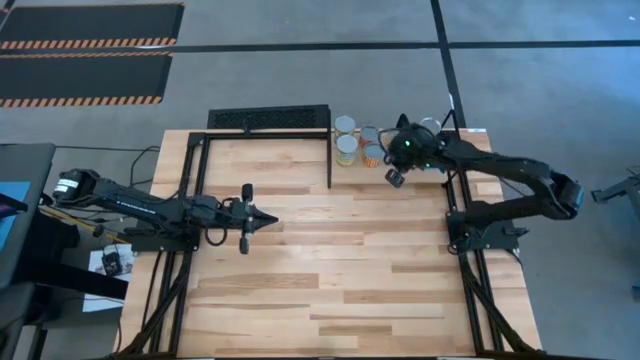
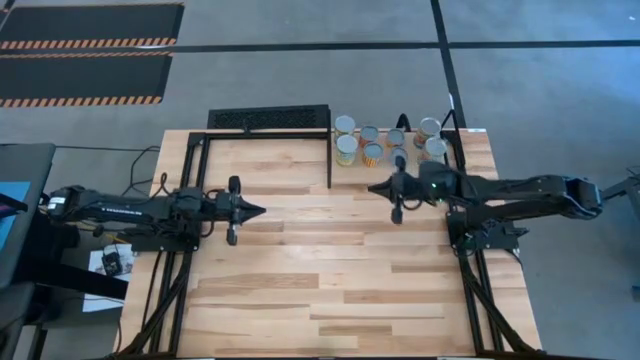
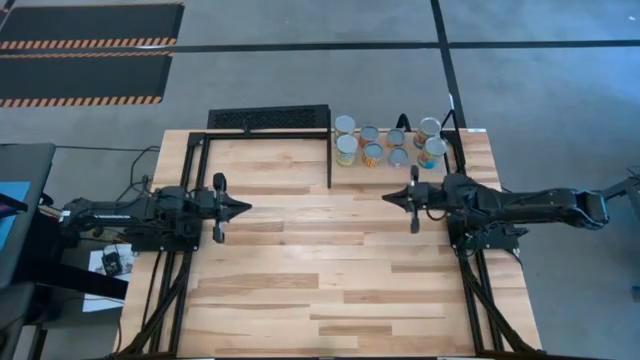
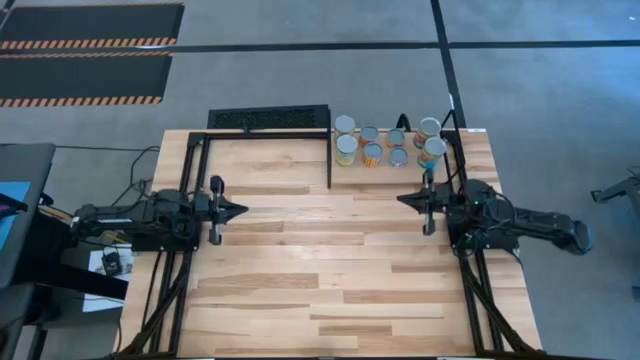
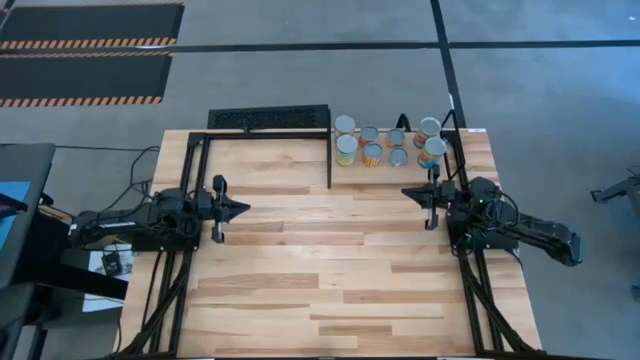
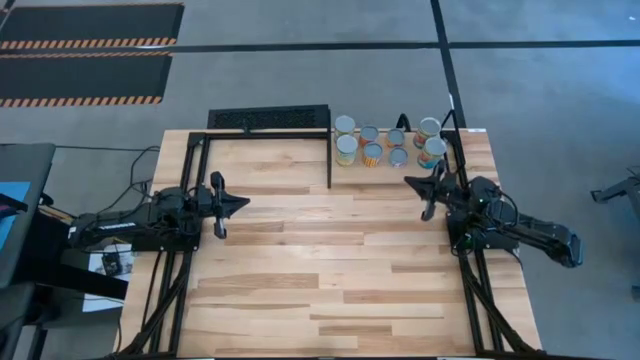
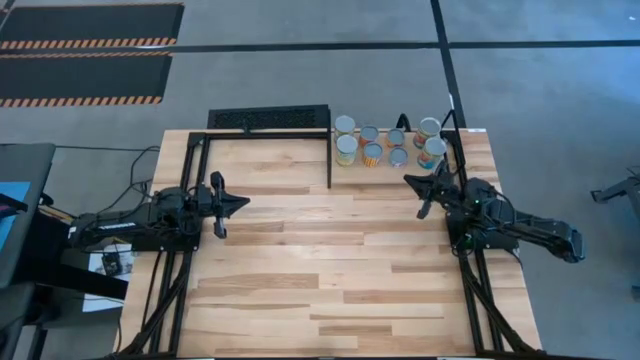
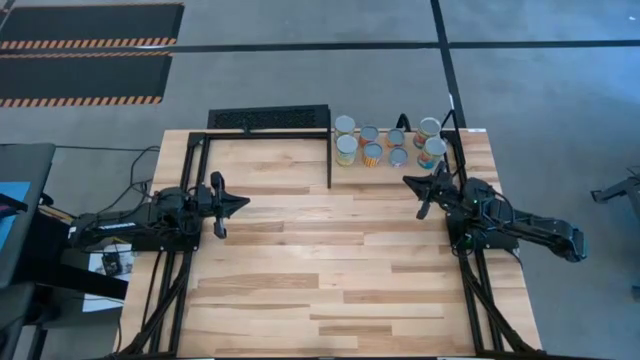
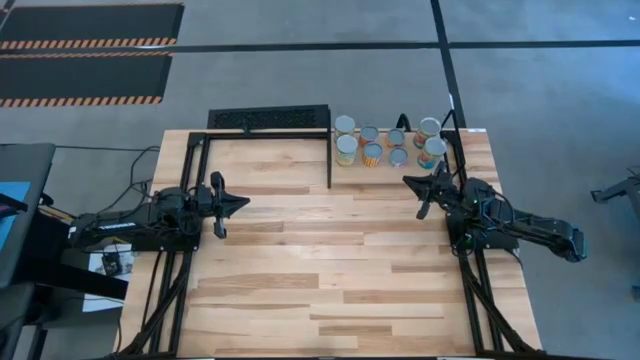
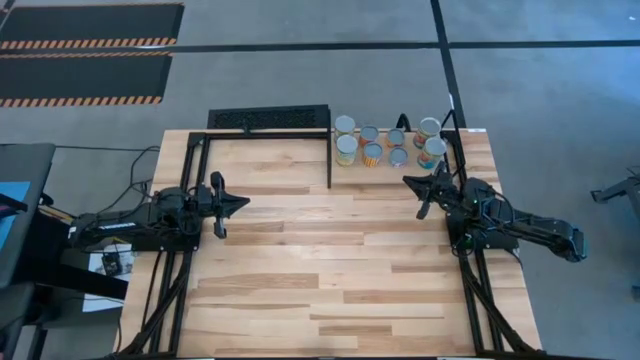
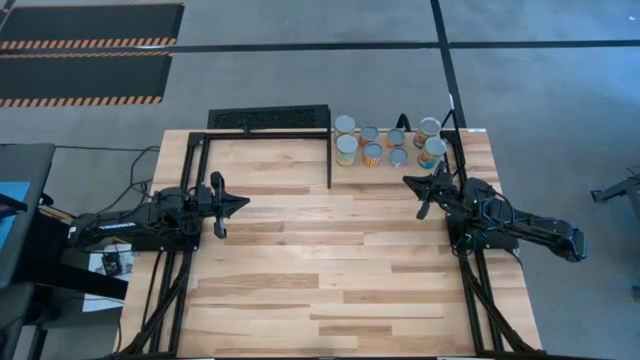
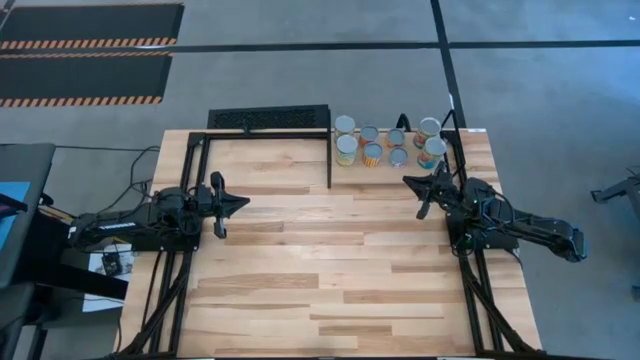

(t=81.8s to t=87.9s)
Task: Pick and place cans onto a shelf
Return to Home Position

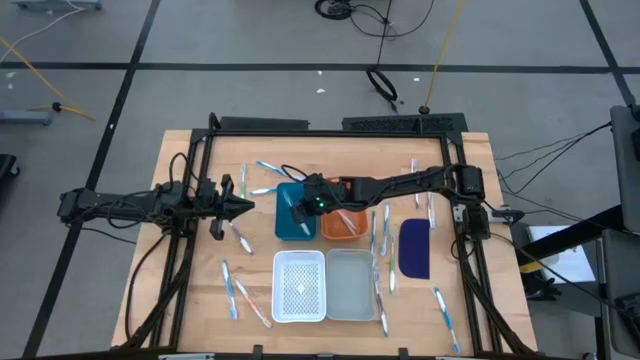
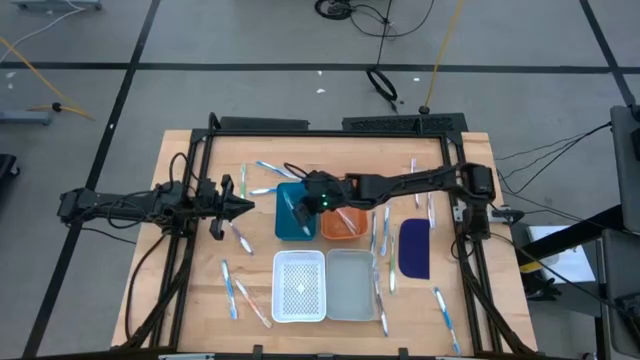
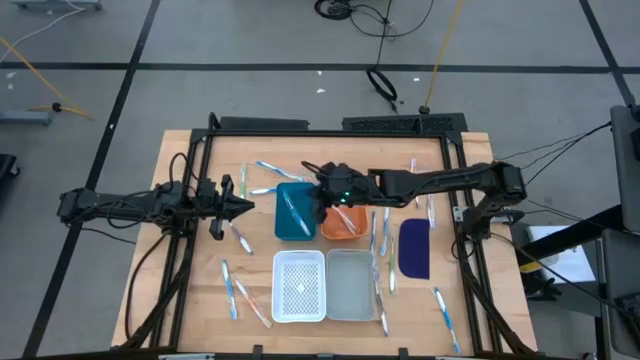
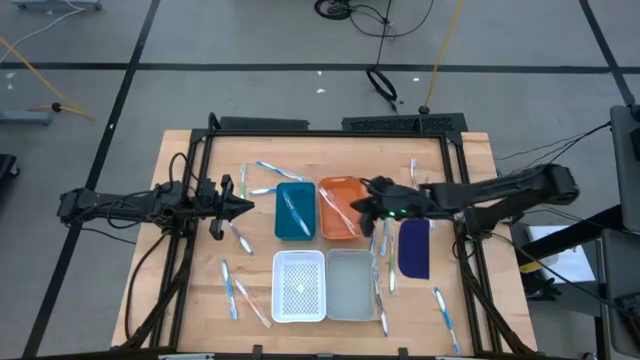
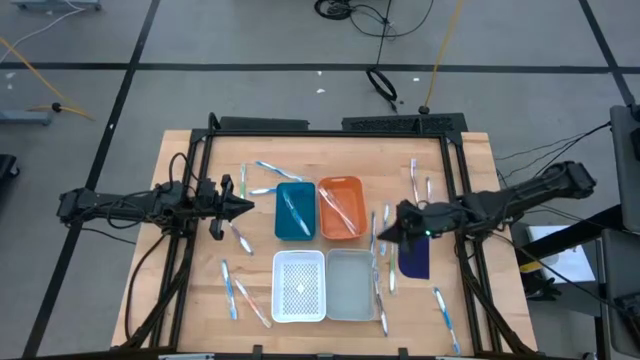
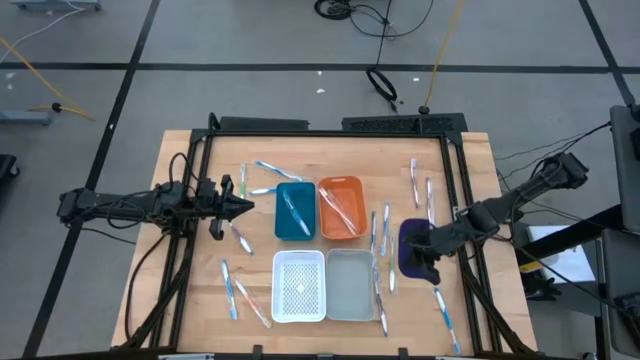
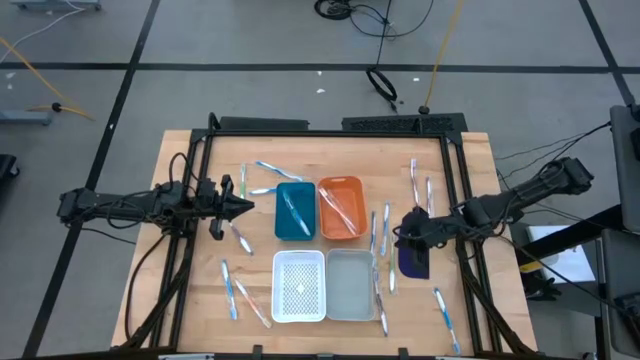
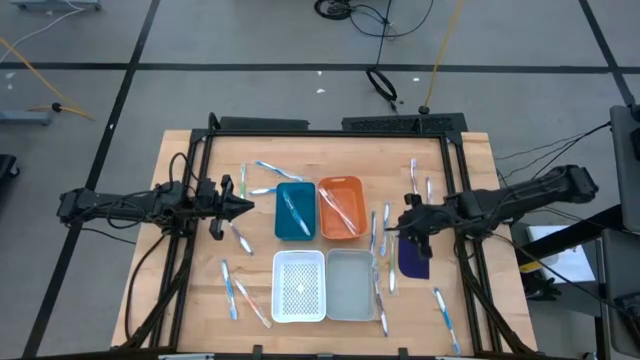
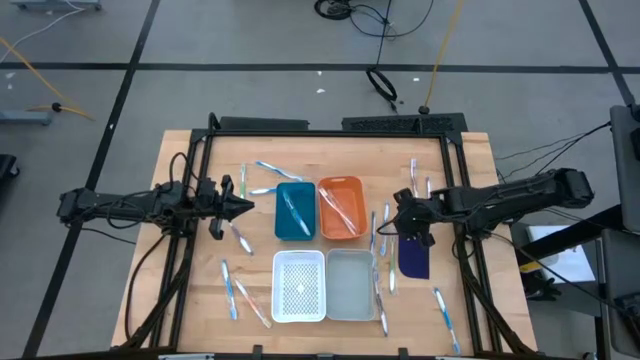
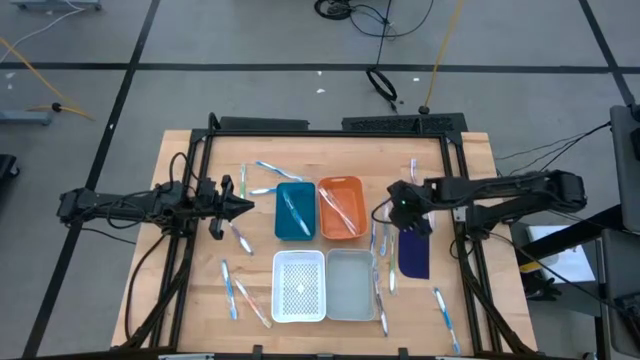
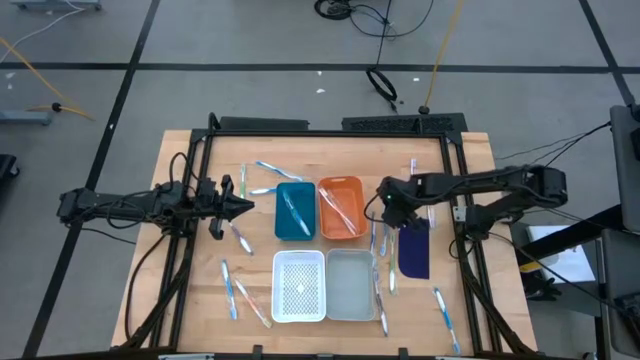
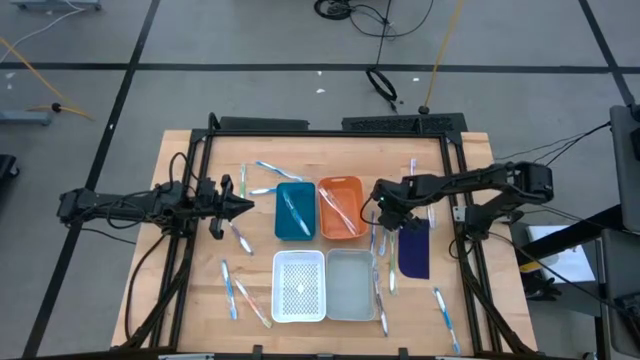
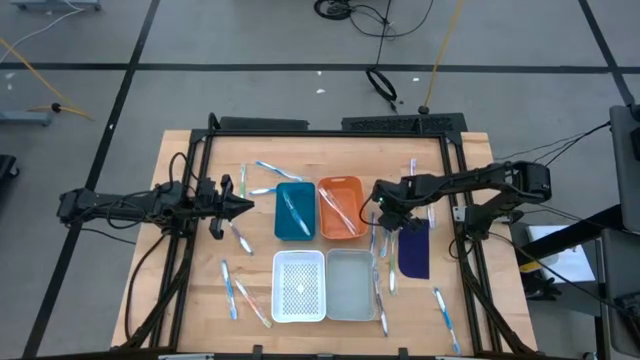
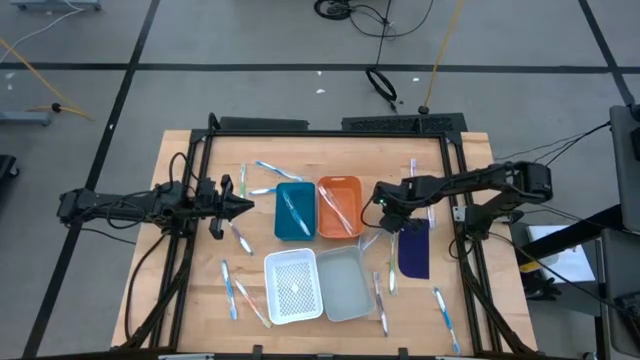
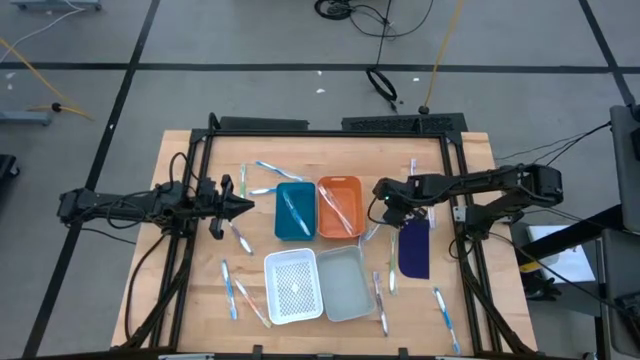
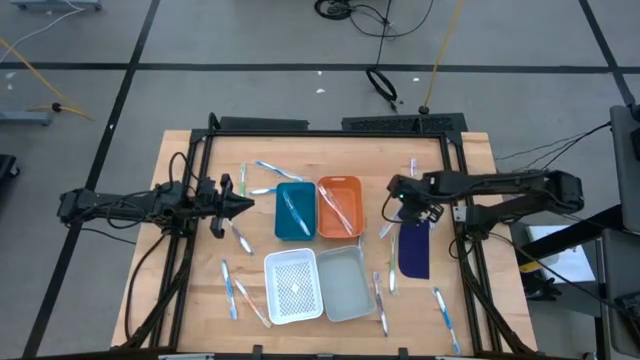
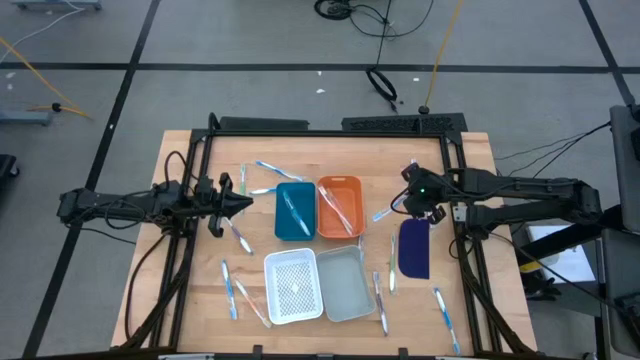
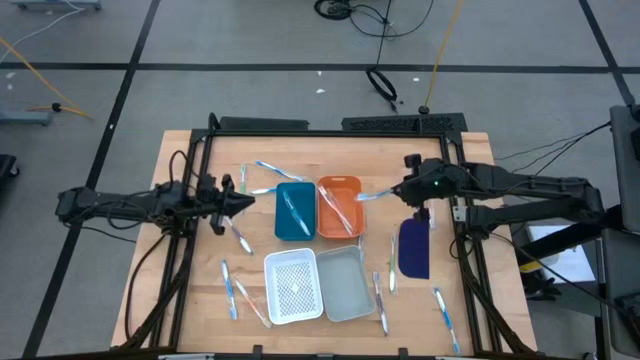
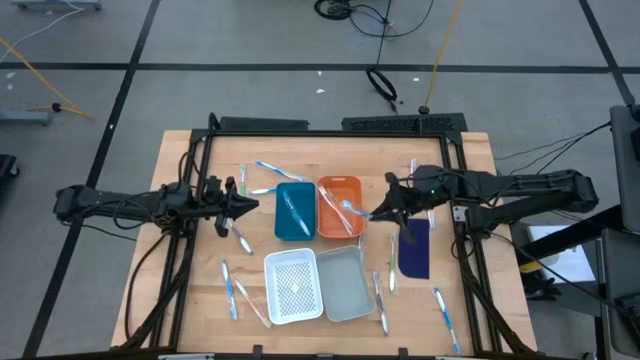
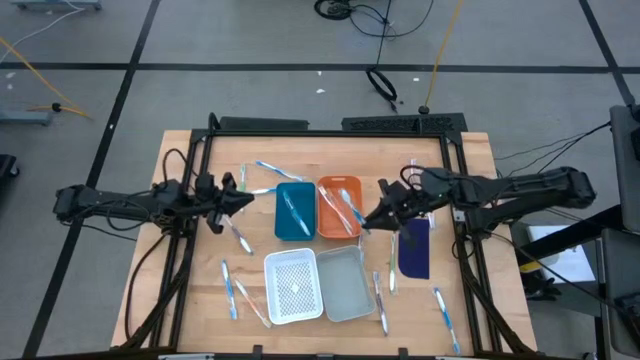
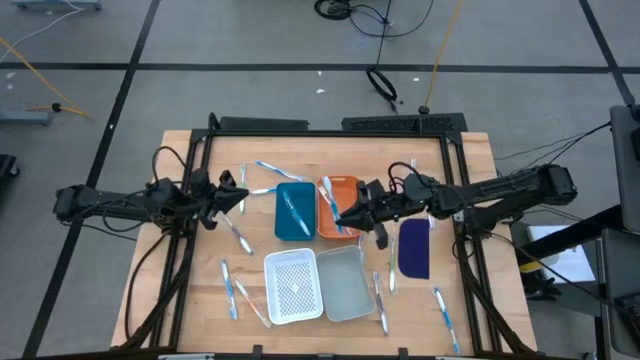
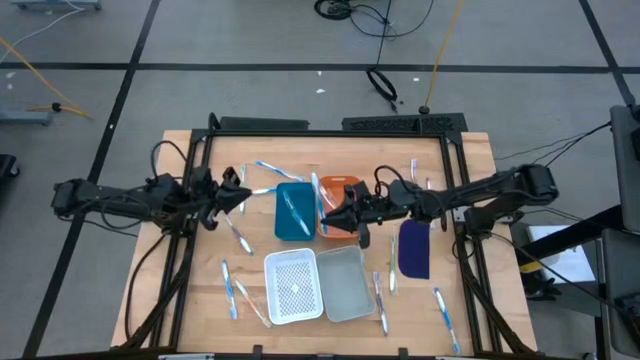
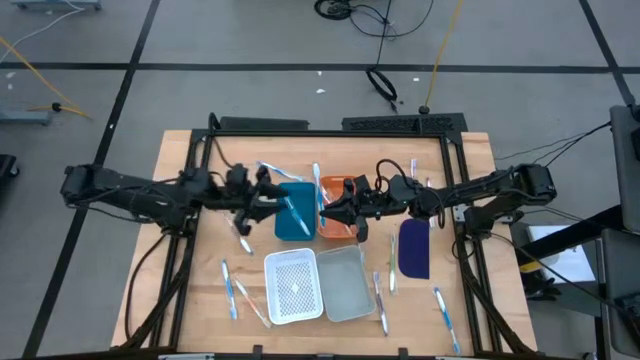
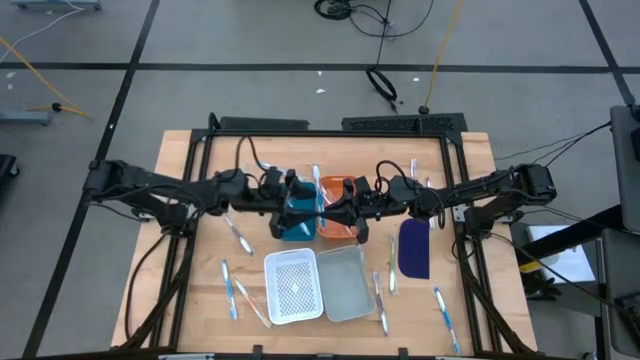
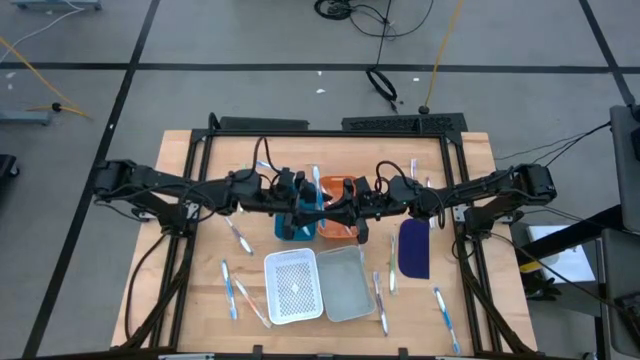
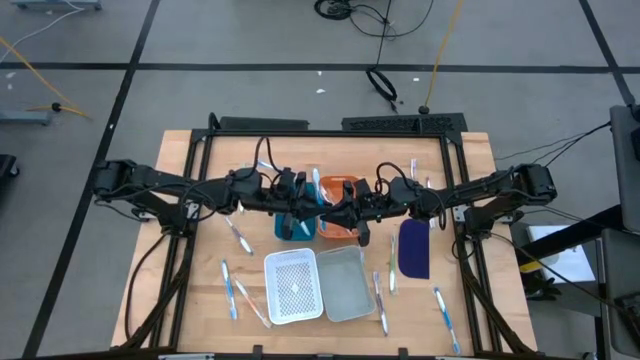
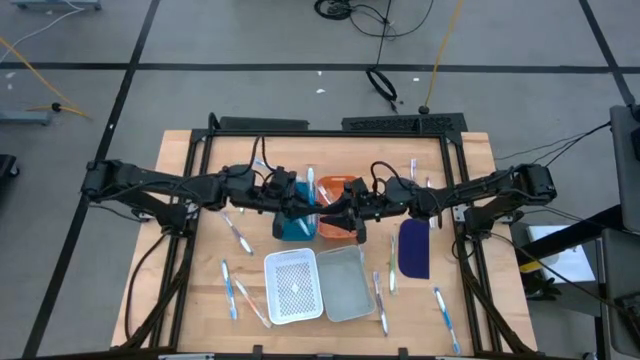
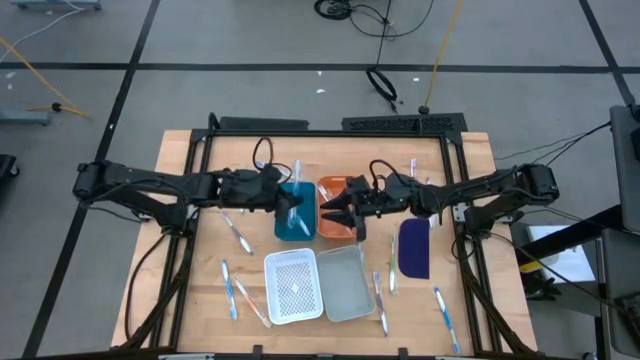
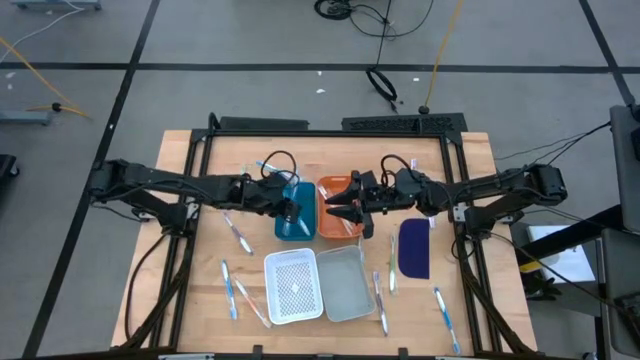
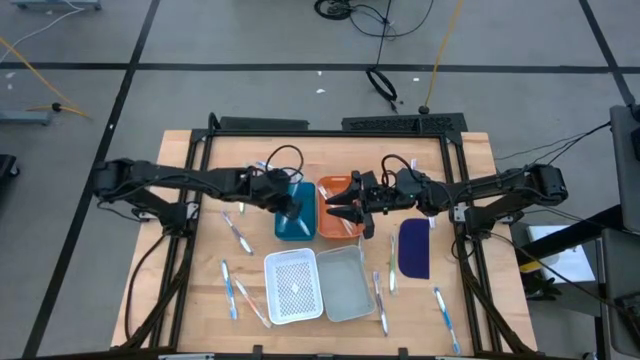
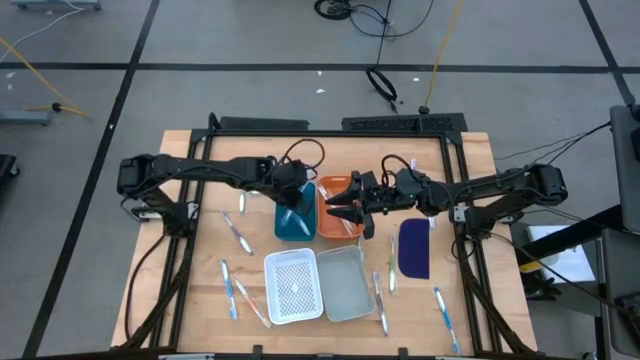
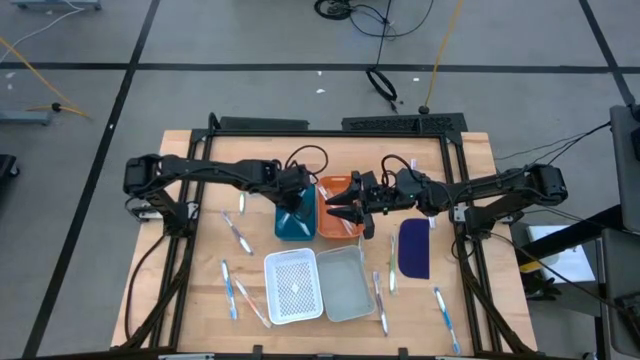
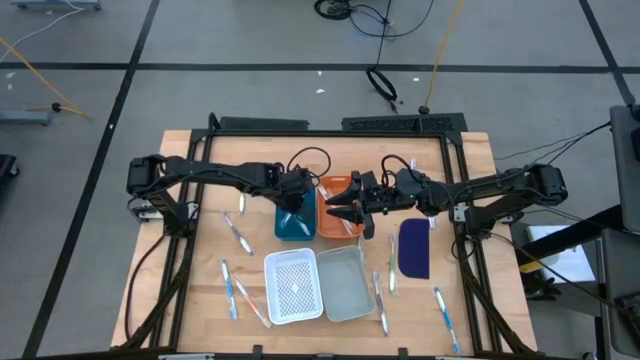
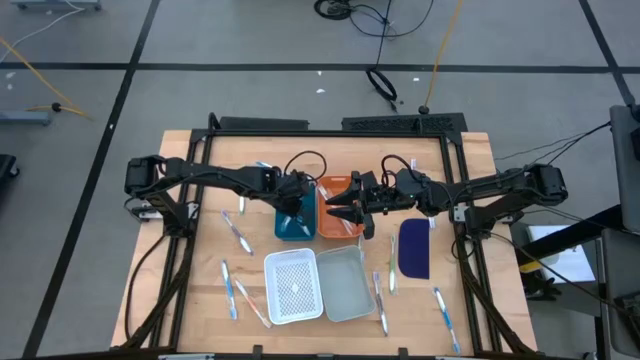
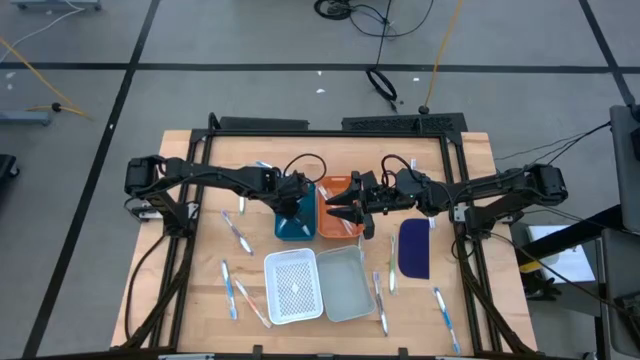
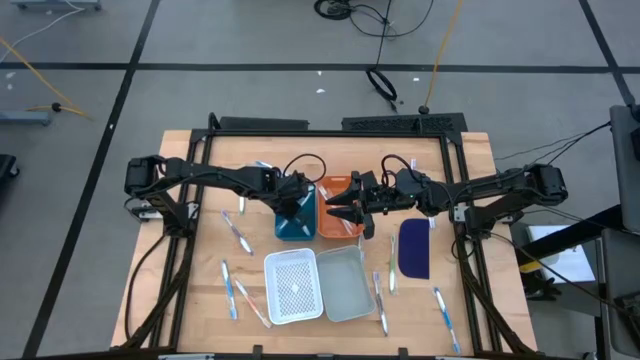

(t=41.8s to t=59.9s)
Task: Pick & Place Toothbrushes
Put the blue toothbrush into the blue bin
